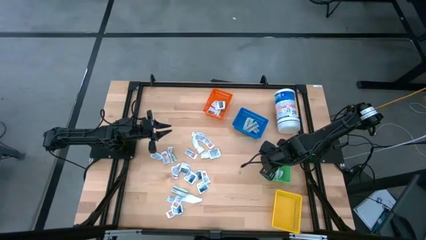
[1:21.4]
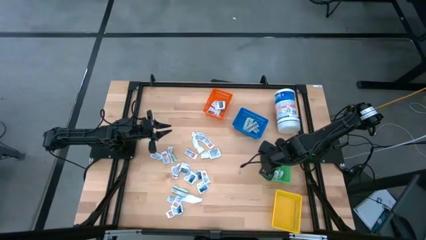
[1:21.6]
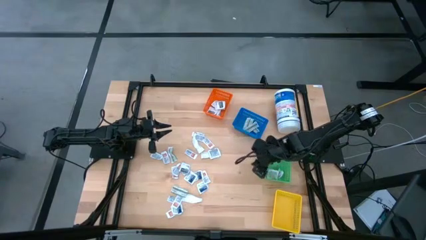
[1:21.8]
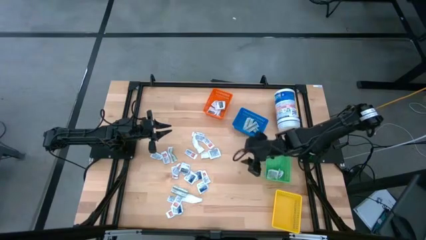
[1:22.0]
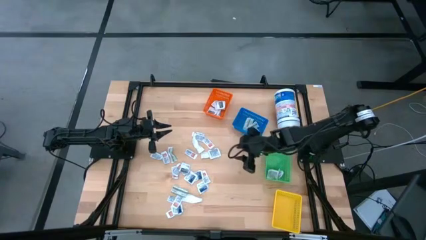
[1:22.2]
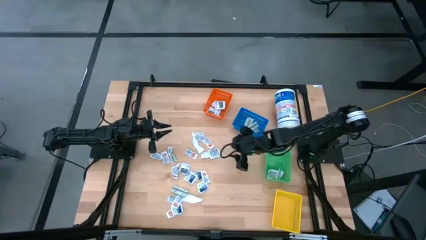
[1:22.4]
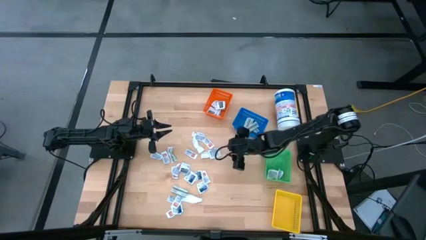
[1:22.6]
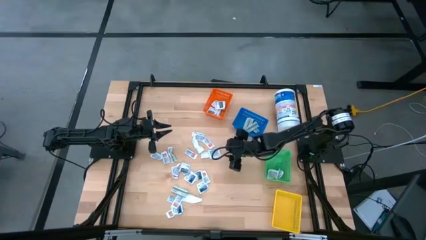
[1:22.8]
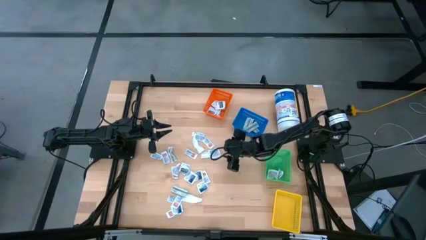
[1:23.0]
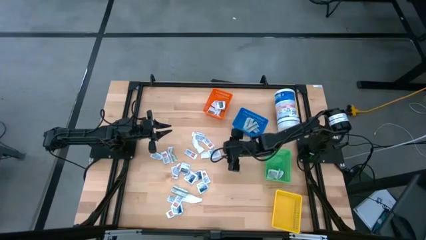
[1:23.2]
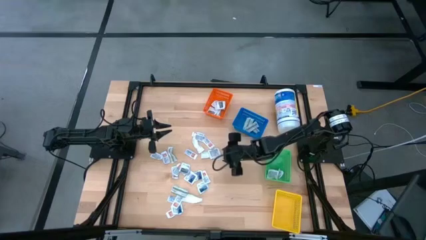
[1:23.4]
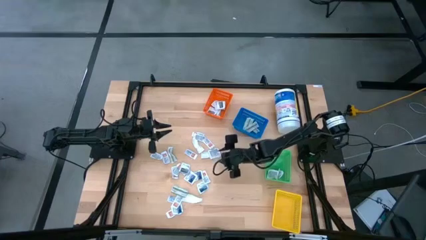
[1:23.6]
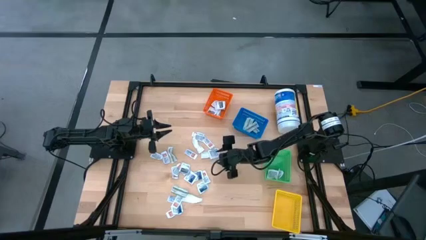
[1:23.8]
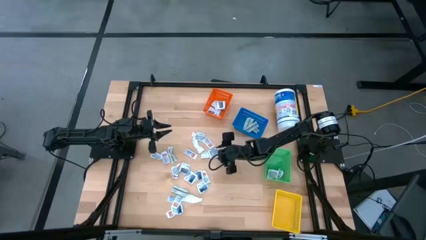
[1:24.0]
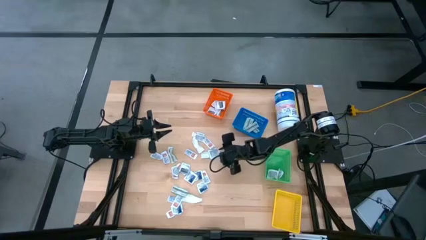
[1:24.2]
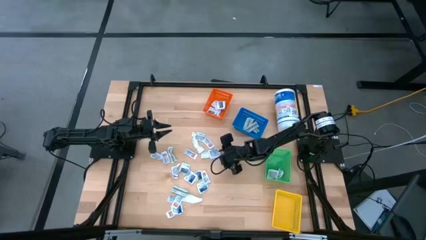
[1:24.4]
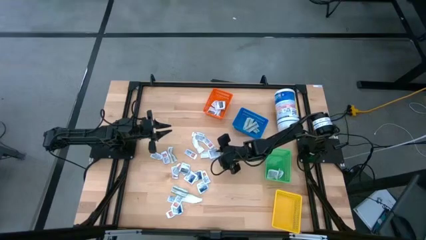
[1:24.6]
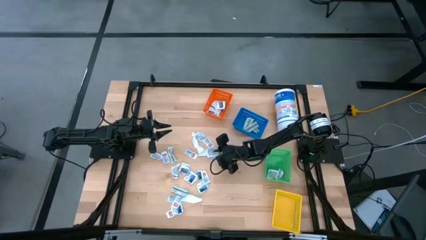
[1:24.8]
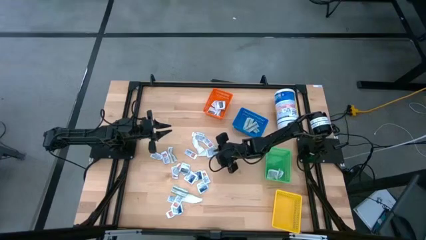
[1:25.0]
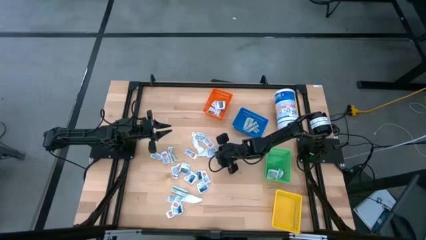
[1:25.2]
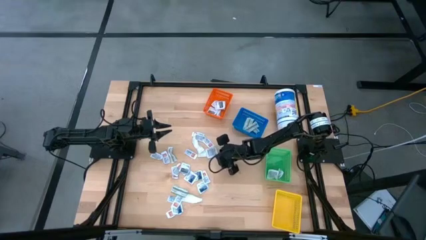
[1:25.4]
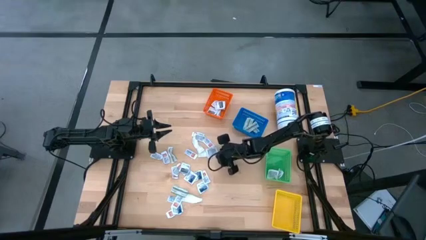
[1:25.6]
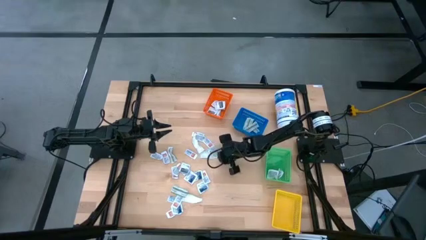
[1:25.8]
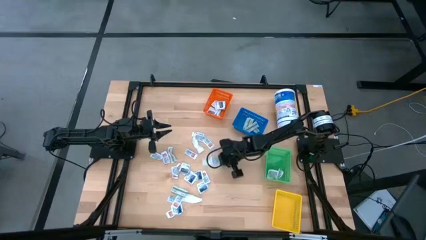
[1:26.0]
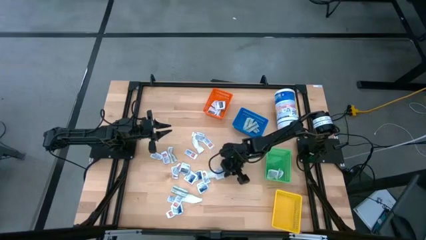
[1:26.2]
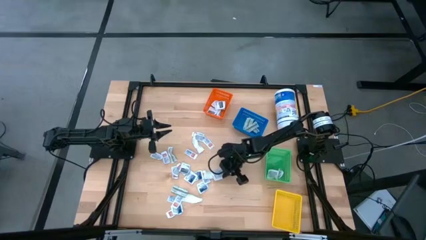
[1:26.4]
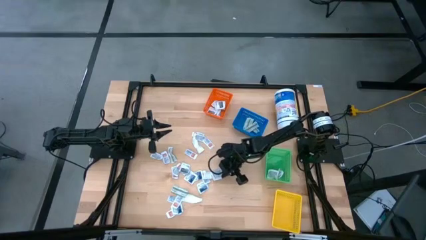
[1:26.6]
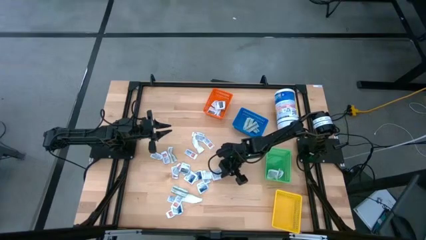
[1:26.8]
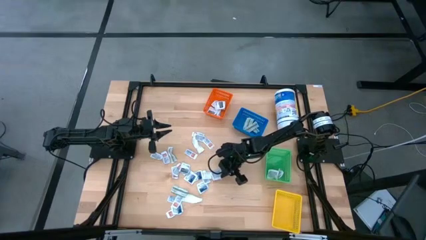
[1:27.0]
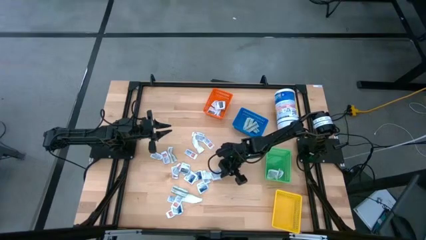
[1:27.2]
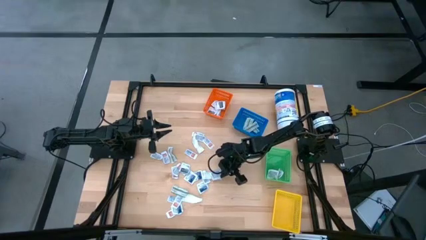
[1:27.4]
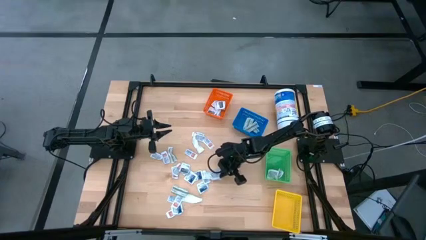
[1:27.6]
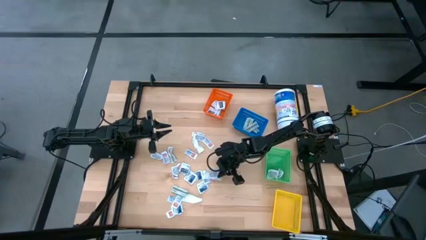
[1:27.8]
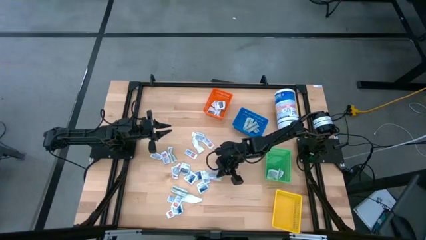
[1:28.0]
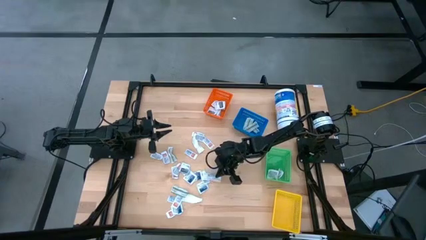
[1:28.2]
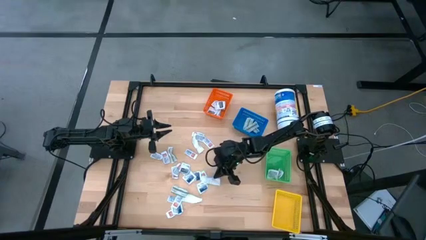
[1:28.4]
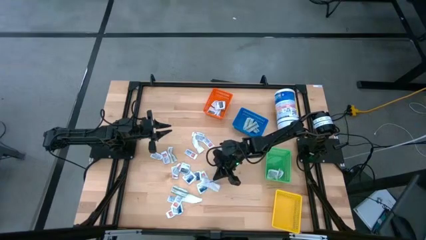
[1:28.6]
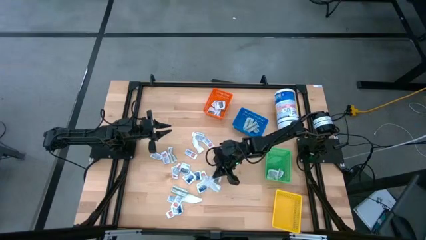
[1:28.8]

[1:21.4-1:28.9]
Task: Pick & Place First Aid Supplies
Put the gray towelette pack into the orange basket

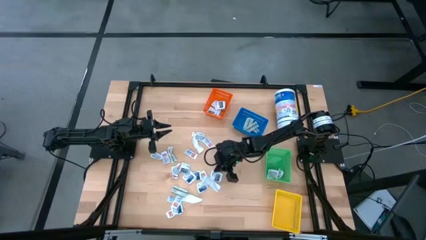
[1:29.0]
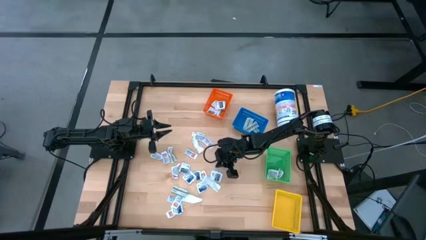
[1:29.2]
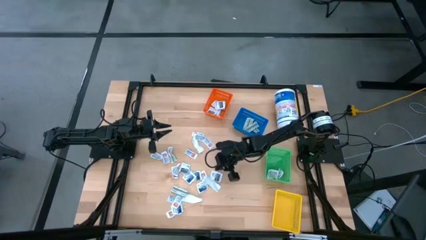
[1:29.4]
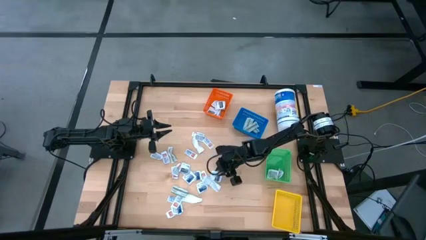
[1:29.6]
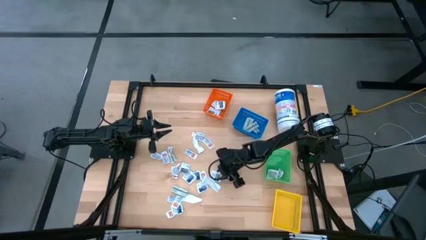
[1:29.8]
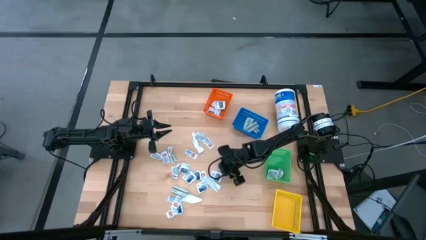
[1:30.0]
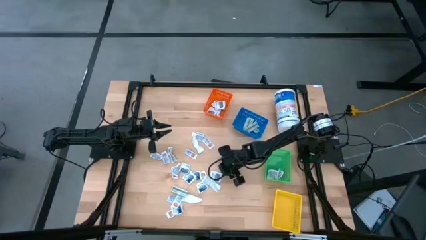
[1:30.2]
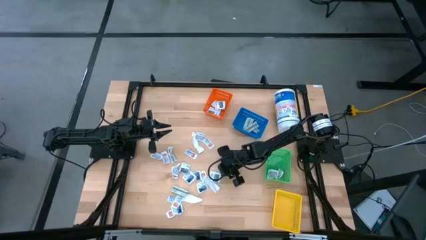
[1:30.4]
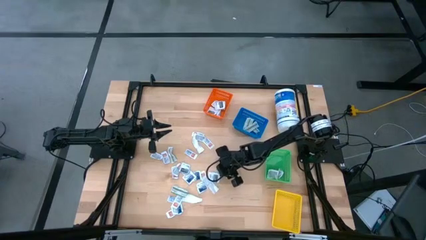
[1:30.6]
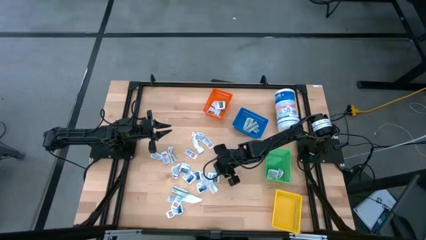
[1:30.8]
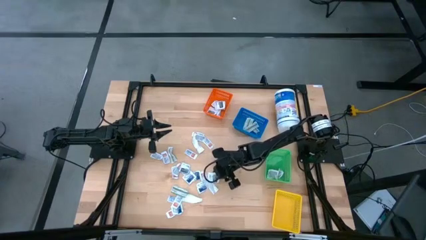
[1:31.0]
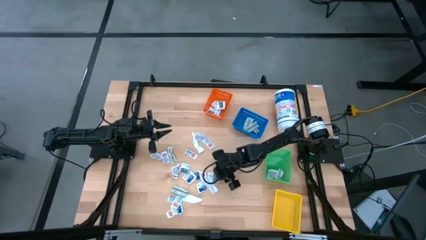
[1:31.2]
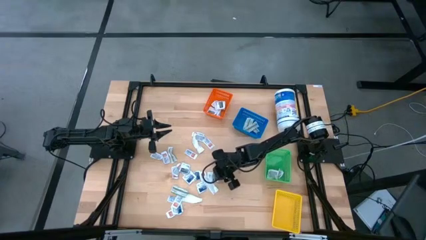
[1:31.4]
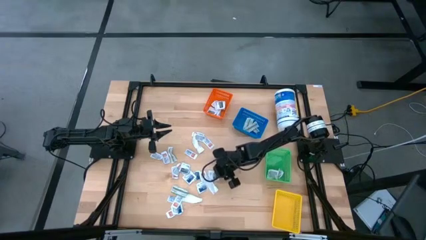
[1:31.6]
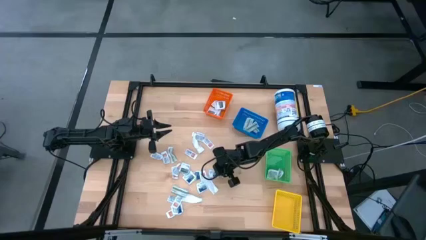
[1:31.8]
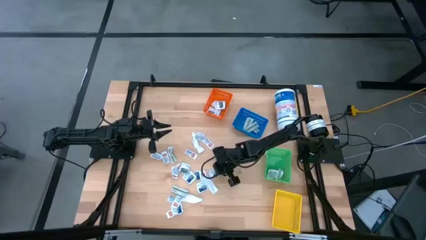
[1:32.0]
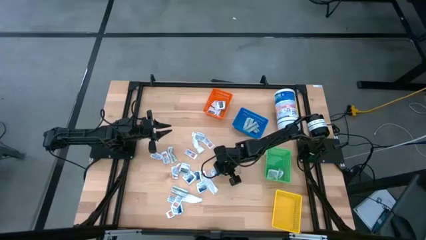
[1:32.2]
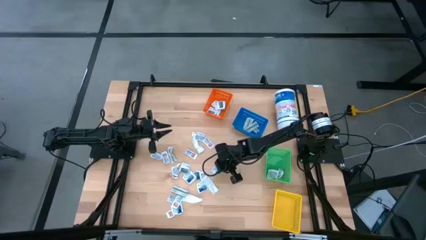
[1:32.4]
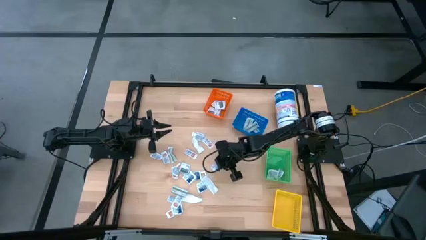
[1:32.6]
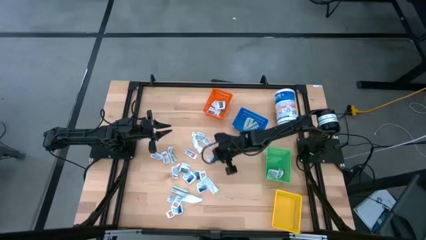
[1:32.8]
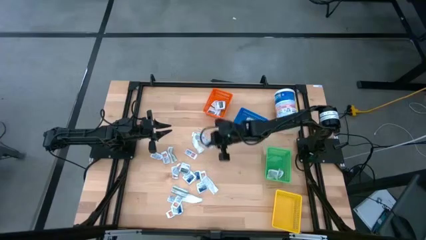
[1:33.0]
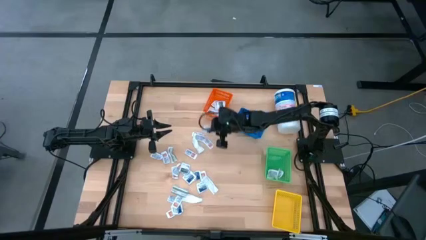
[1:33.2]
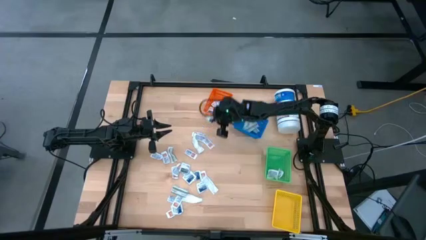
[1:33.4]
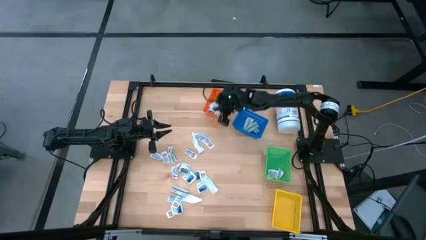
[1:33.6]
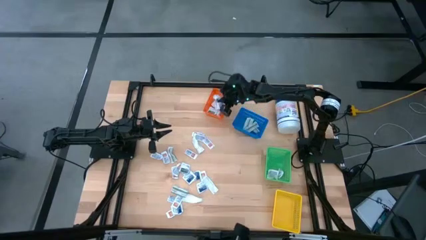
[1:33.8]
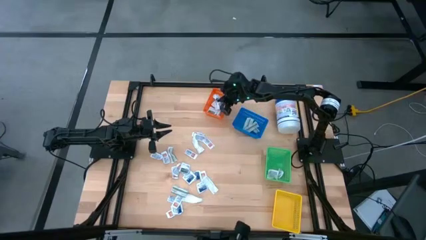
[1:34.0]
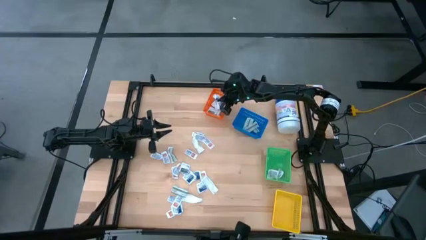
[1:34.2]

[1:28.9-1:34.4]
Put the gray towelette pack into the orange basket

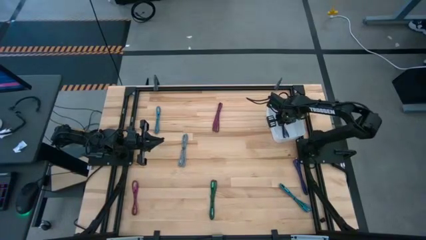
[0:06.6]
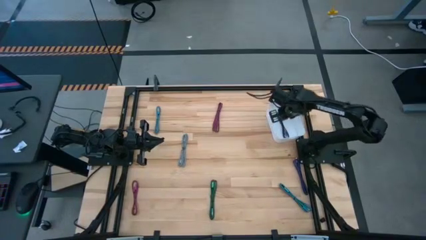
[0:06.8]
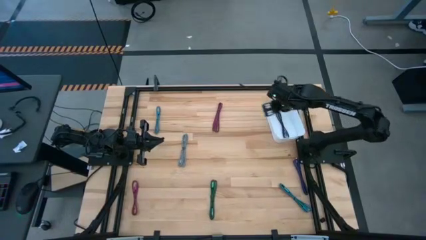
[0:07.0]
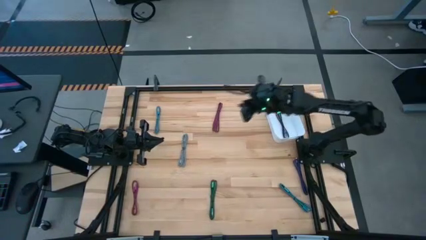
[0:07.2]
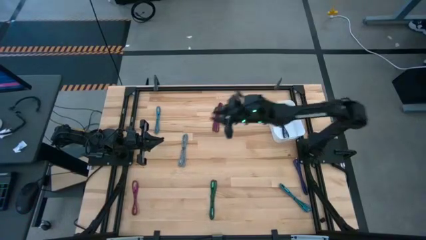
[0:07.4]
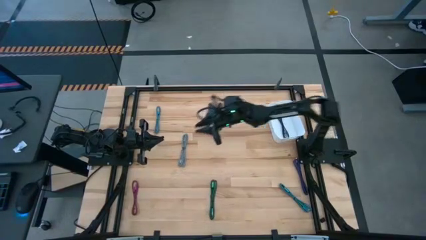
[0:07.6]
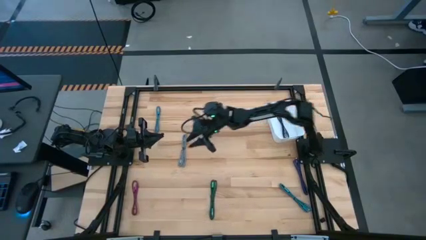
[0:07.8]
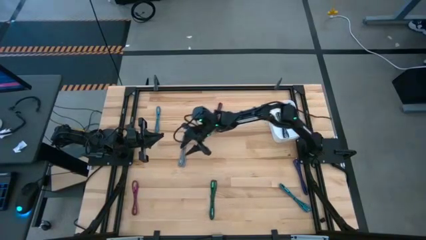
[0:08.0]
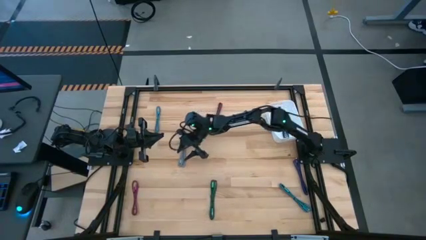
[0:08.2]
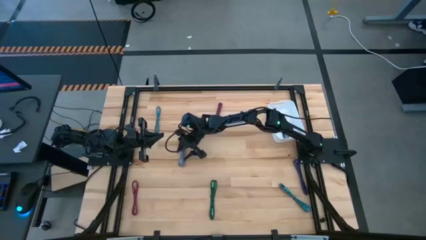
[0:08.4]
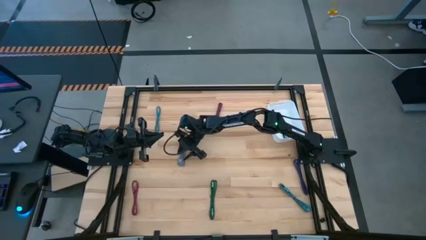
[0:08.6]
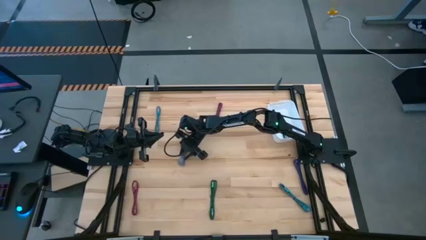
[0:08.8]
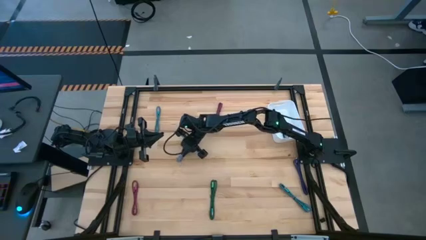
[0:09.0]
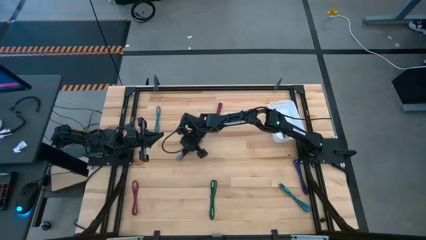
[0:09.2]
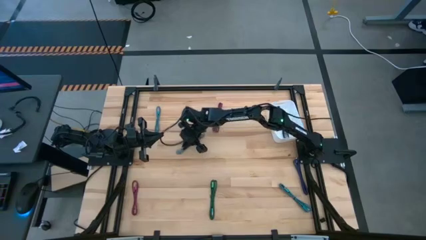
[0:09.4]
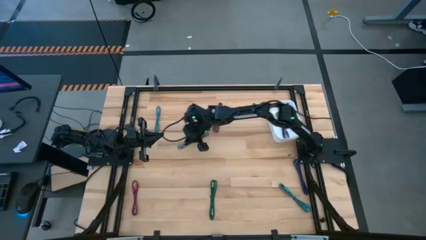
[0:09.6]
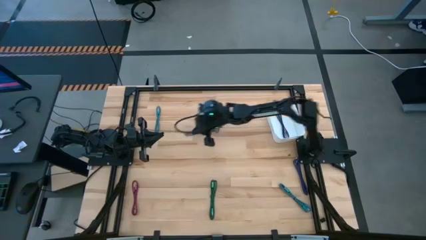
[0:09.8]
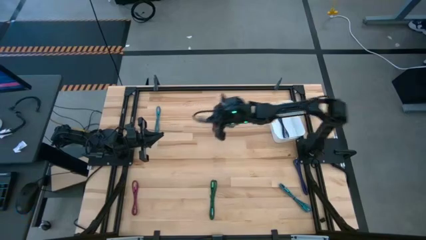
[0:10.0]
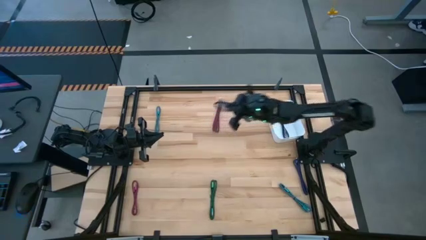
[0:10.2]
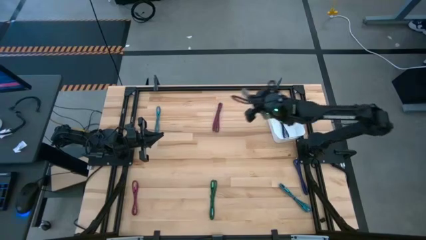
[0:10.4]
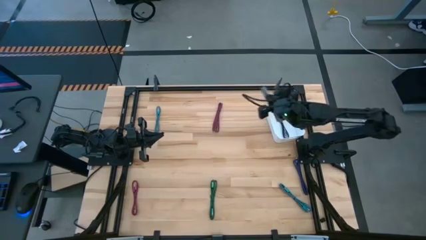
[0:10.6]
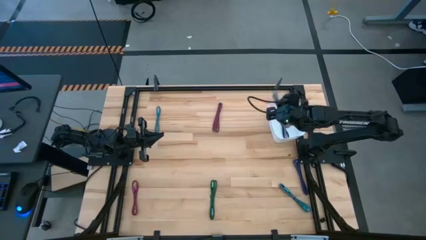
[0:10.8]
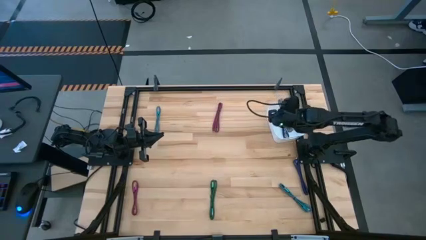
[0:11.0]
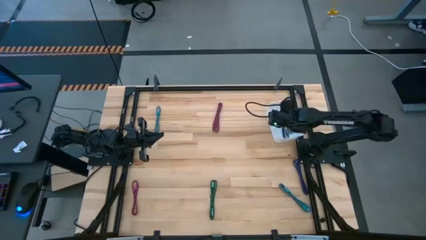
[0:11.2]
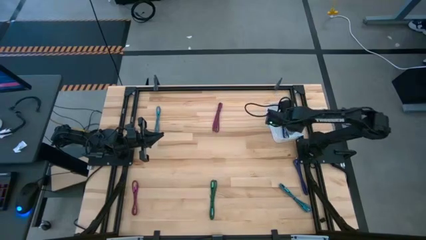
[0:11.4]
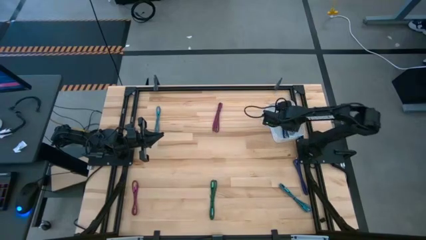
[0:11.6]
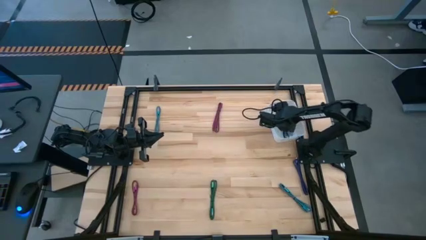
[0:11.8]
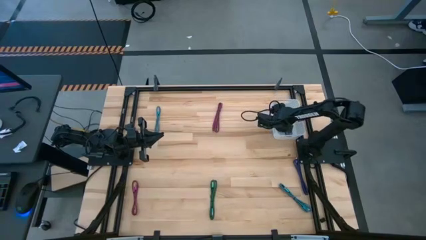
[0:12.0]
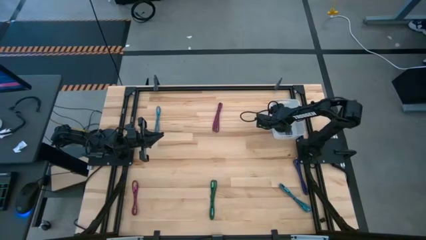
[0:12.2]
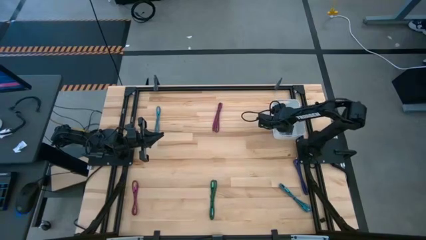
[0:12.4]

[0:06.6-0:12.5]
Task: Pick and place USB-C Cables
Put the white charger cable into the white bin
